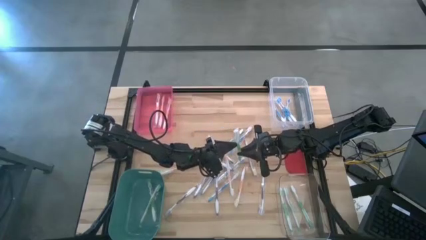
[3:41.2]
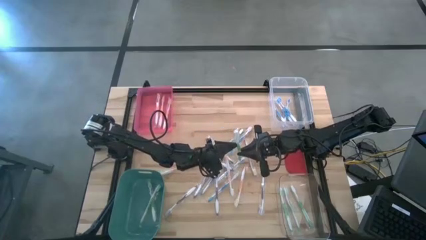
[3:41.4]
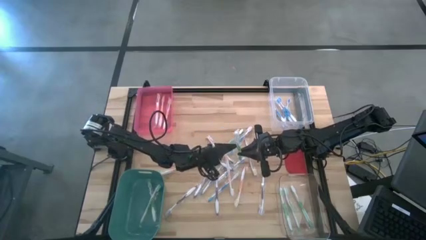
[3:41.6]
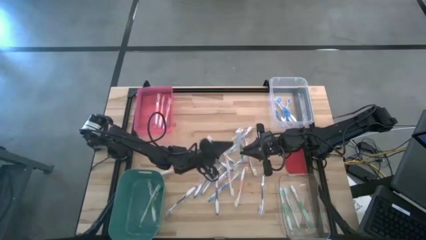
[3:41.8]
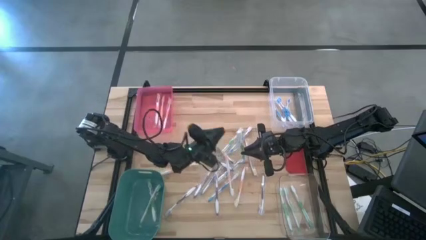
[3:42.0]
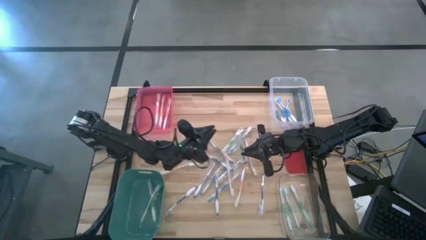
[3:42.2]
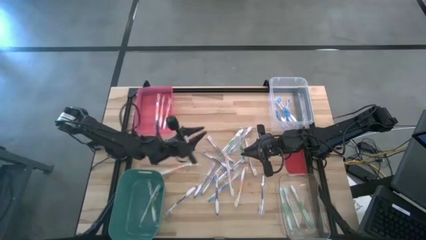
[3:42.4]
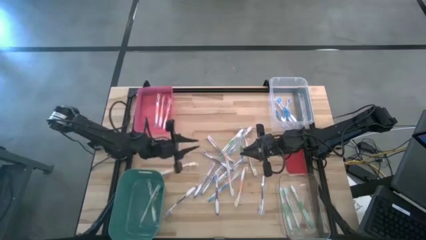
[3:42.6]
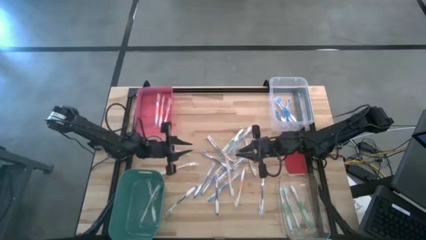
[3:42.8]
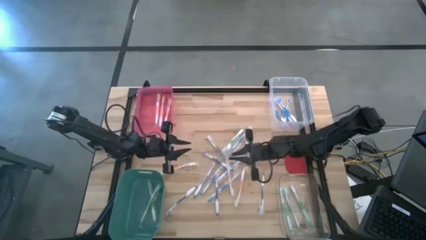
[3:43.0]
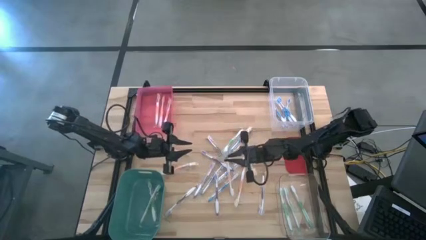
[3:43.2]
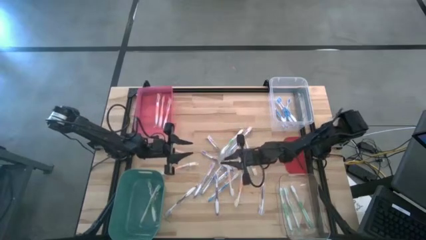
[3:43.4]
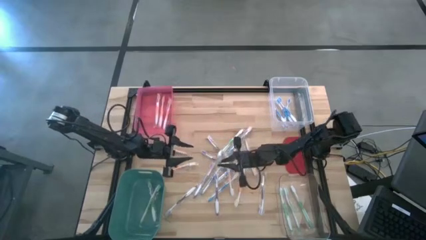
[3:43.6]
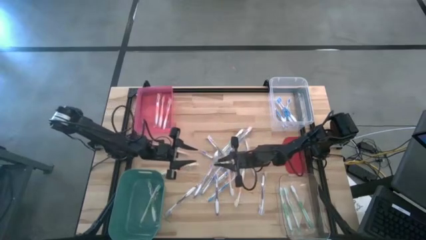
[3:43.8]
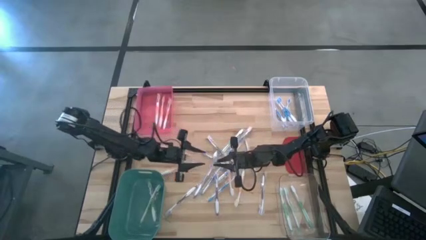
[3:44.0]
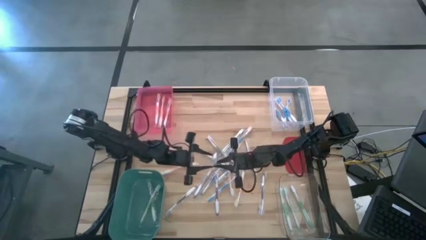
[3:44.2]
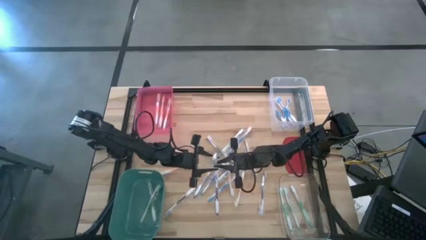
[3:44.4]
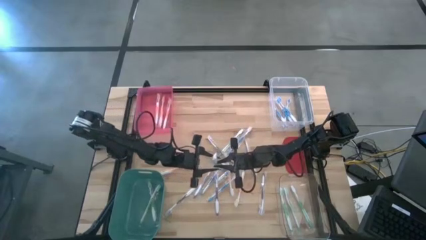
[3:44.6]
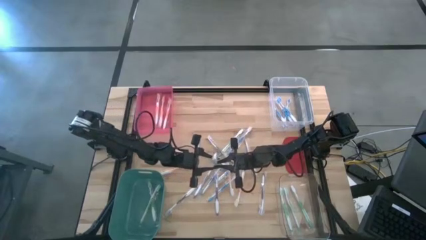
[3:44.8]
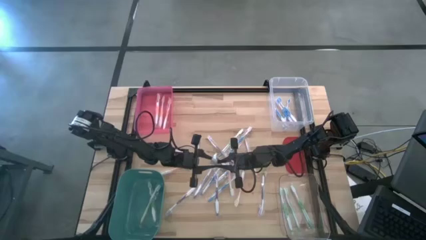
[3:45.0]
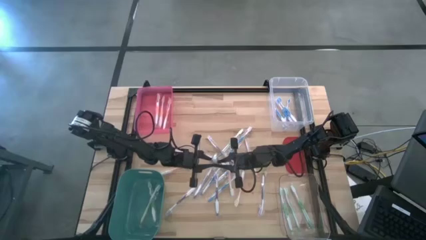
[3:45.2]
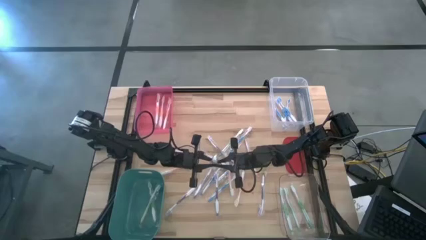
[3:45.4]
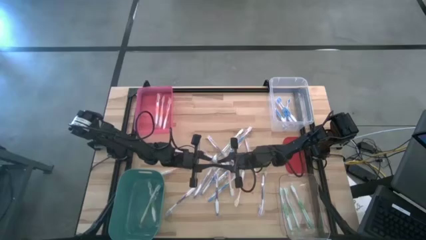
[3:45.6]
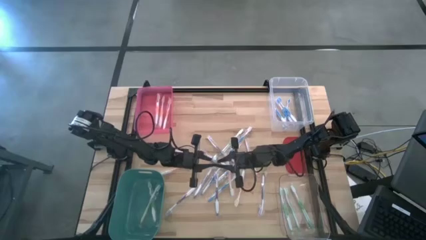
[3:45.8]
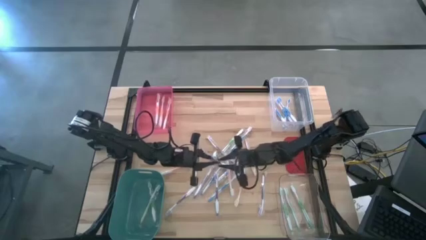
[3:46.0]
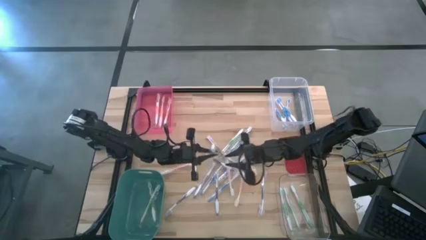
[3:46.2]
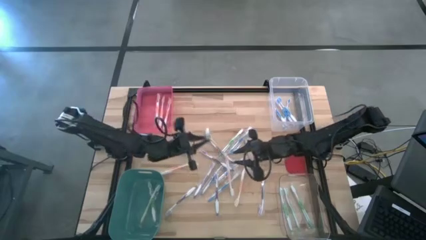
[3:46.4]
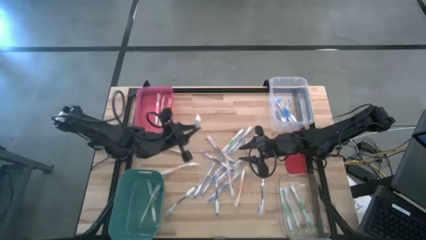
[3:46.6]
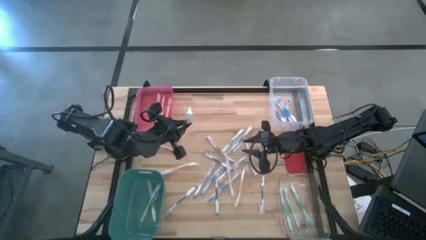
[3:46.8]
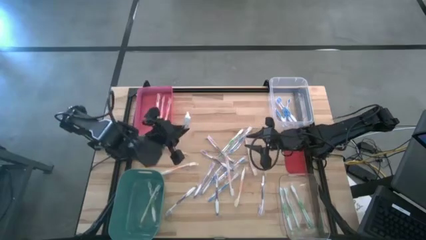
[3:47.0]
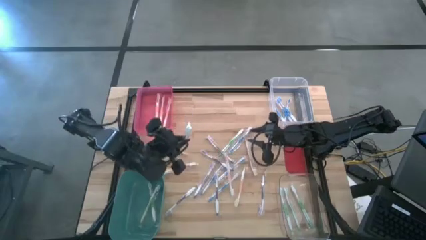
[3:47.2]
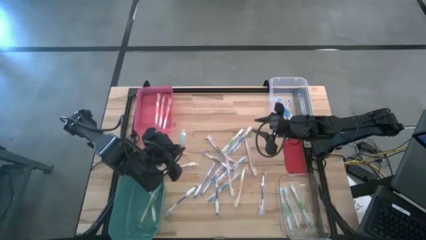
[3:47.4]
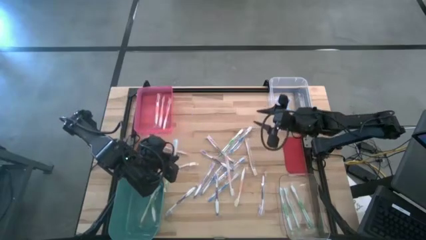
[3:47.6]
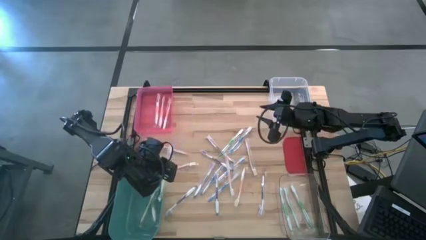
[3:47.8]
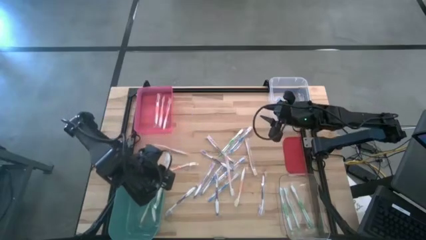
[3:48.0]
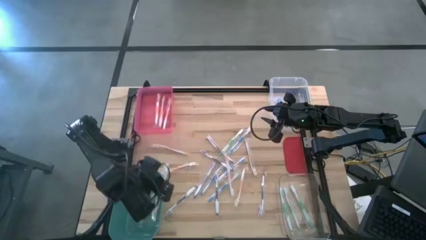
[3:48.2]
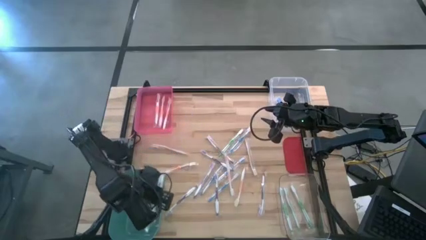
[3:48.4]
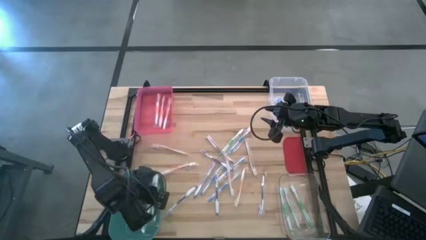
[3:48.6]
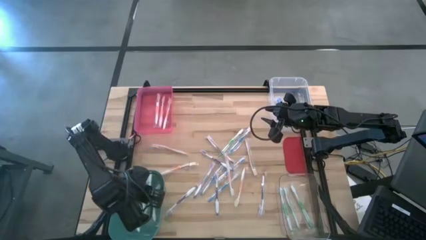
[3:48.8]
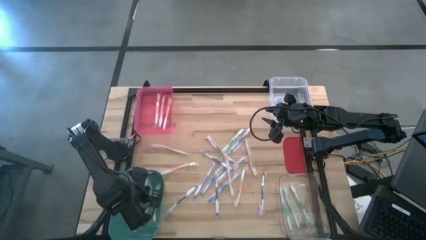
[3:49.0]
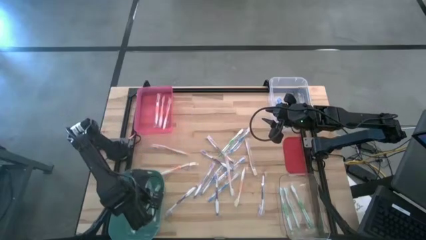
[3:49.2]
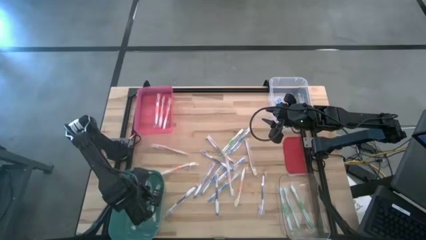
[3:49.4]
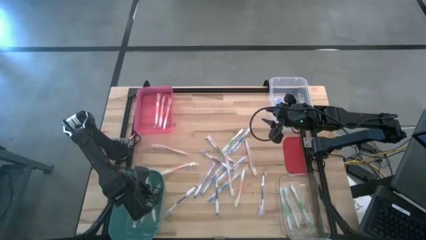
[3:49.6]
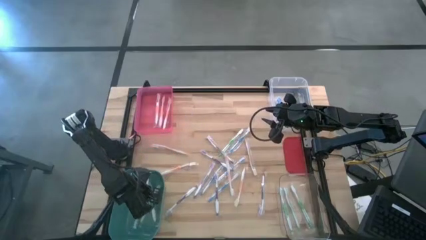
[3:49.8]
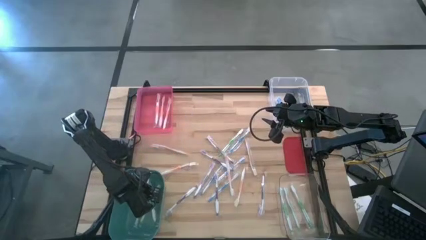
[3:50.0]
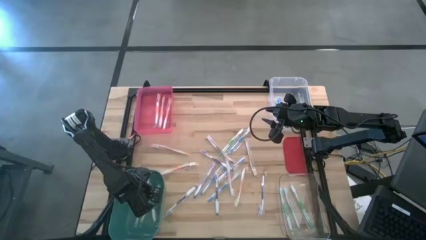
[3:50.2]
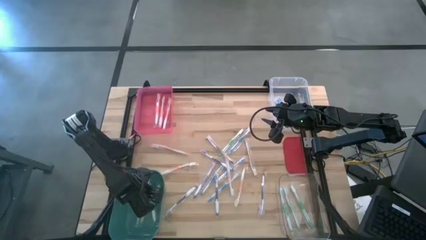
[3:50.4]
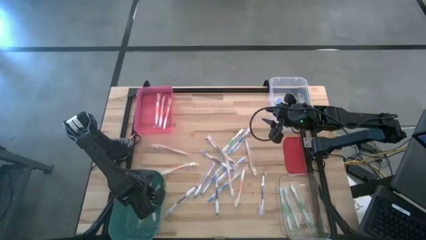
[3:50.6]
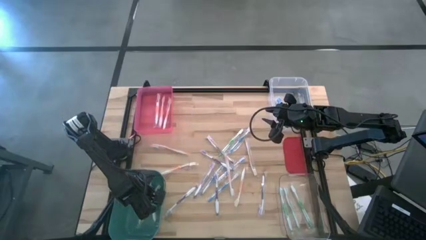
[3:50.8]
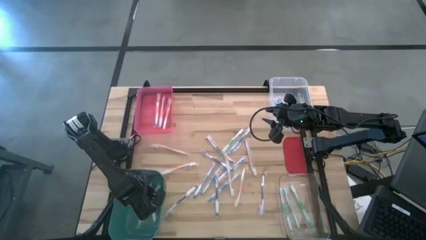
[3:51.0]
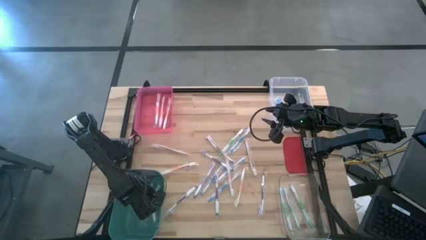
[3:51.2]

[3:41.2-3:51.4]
Task: Pick & Place Toothbrushes
Put the green toothbrush into the green bin

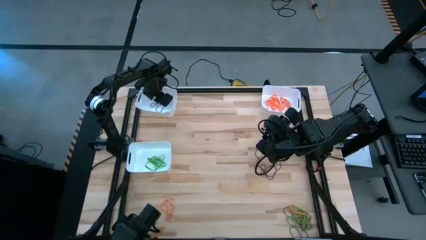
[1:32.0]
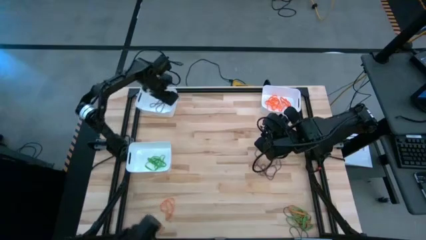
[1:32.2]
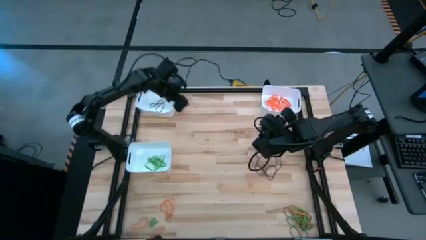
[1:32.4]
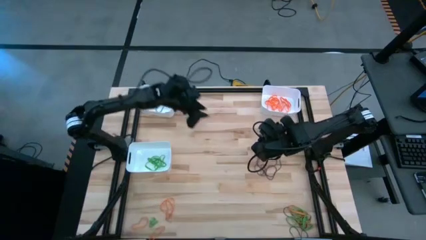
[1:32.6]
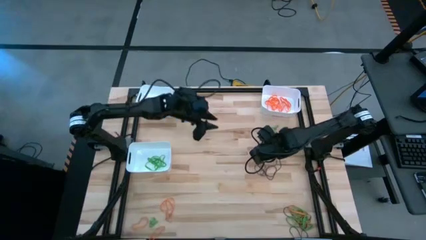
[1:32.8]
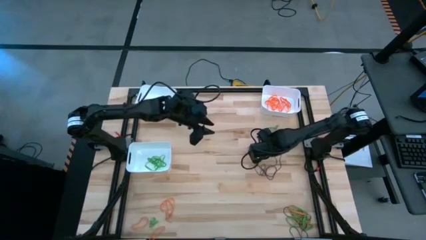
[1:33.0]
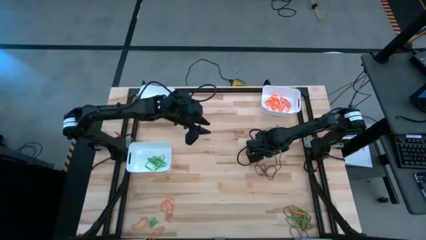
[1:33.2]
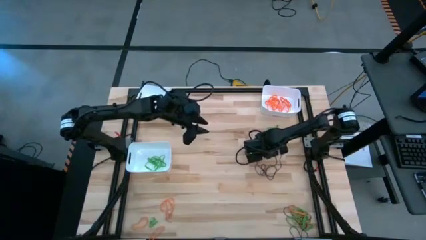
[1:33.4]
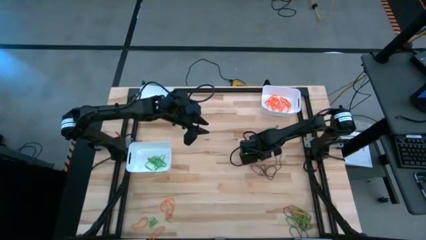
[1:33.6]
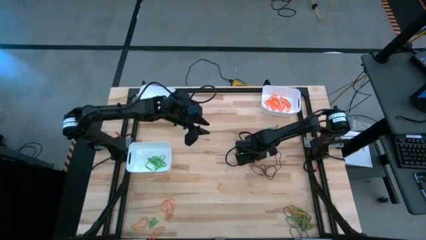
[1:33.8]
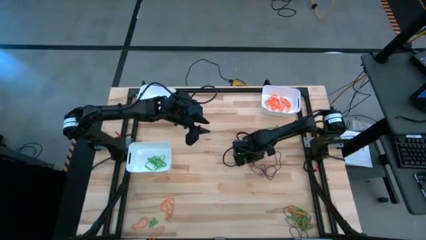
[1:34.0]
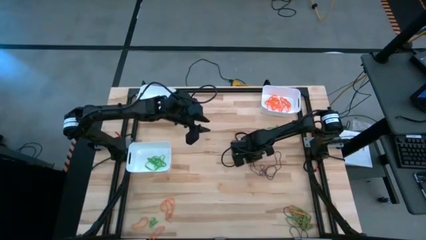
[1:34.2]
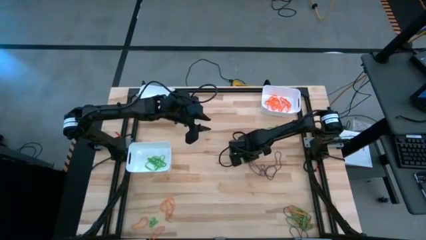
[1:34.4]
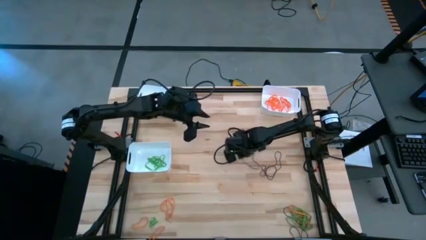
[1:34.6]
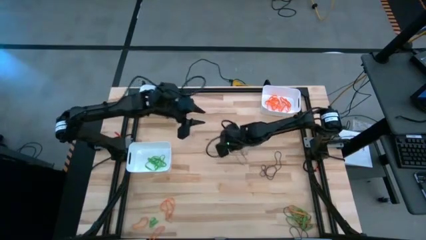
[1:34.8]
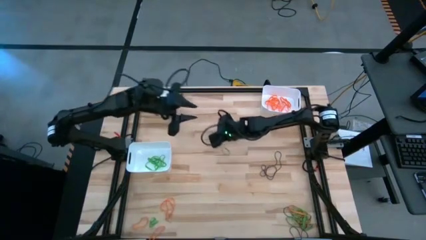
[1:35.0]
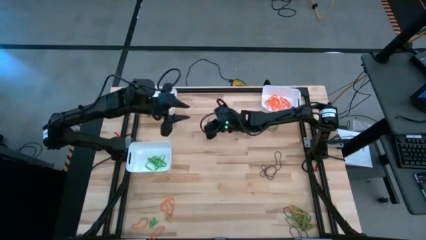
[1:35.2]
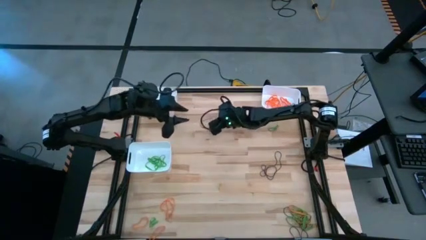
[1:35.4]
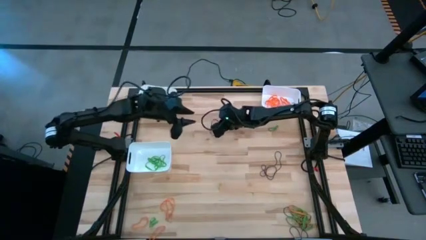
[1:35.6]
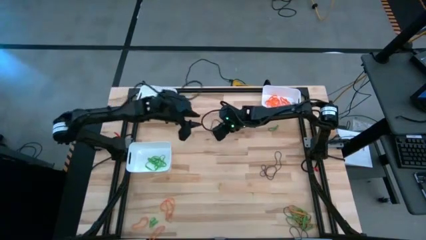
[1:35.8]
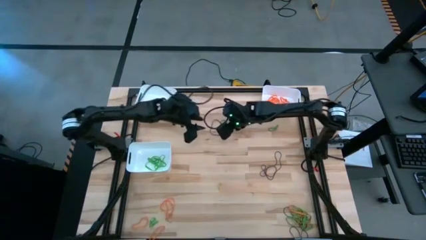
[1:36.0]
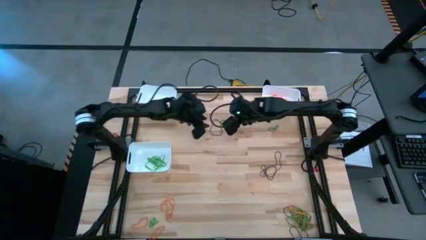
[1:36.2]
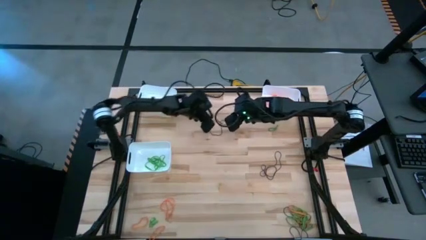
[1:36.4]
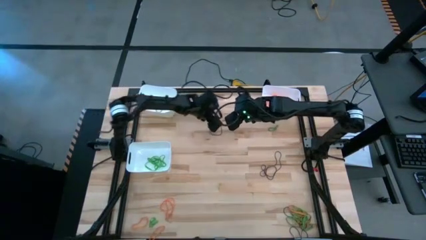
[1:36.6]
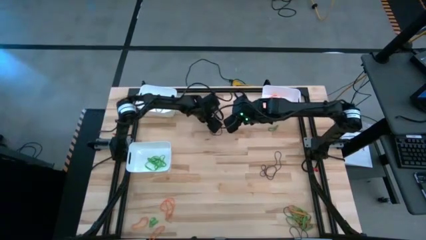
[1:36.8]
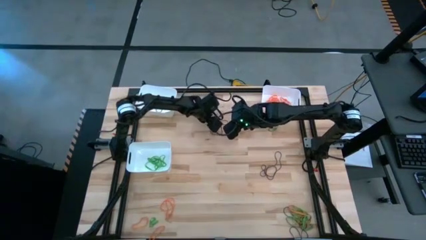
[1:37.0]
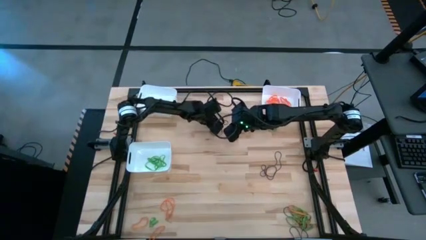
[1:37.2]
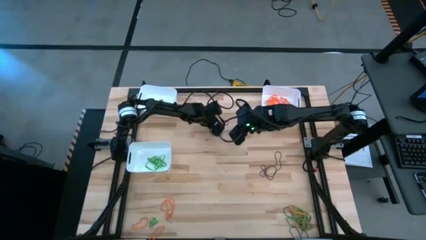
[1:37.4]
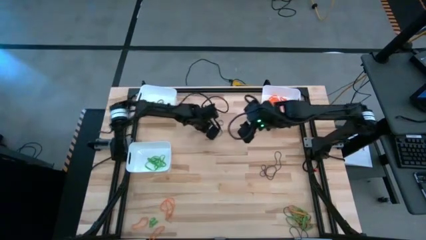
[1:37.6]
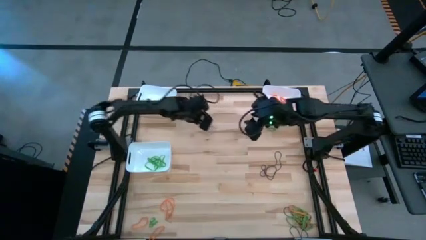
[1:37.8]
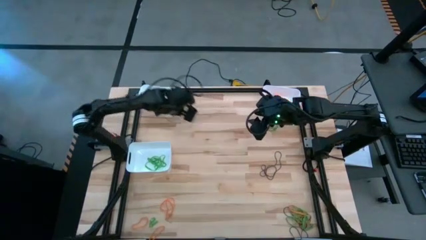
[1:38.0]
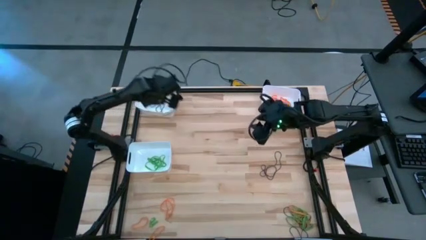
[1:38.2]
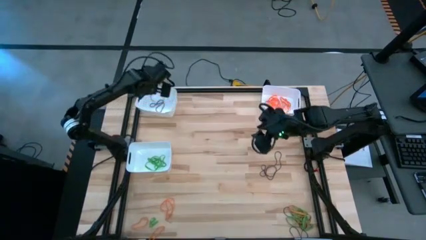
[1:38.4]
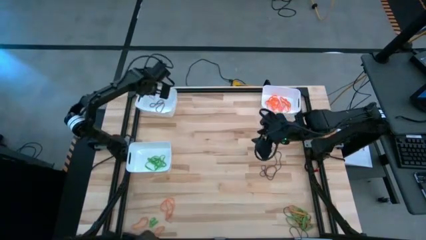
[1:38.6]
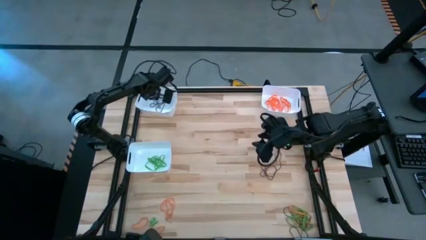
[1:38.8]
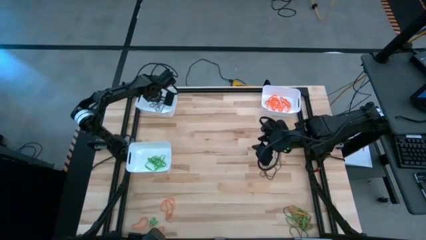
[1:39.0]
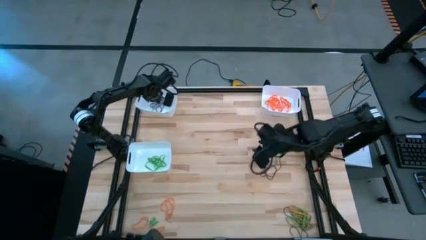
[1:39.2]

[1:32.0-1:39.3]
Task: Sort rubber bands into baskets
Put the purple rubber band into the top left white bin
